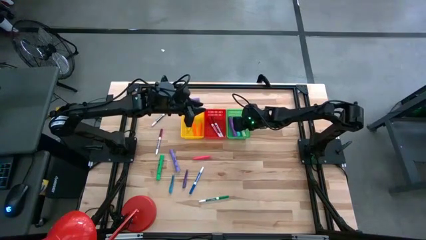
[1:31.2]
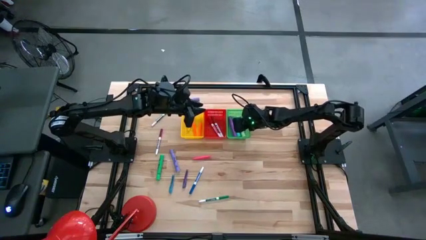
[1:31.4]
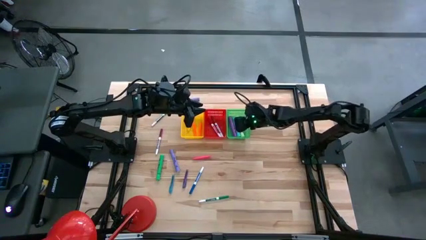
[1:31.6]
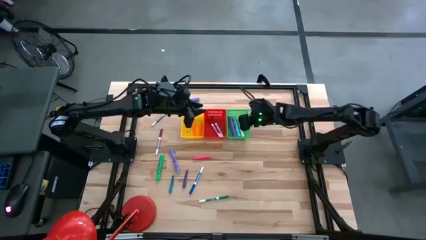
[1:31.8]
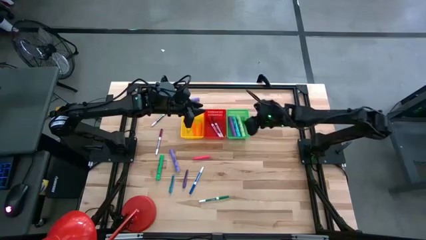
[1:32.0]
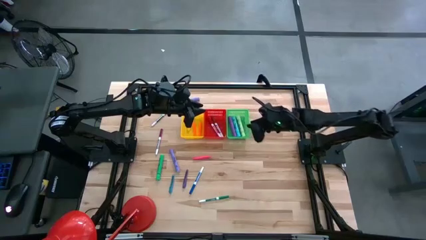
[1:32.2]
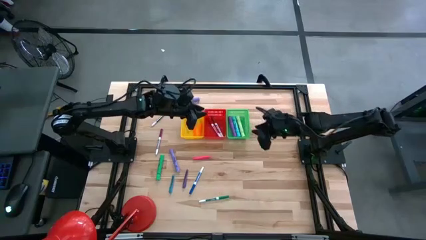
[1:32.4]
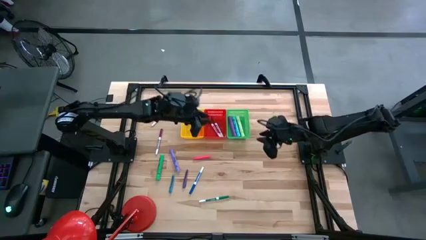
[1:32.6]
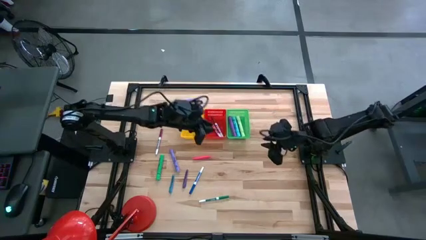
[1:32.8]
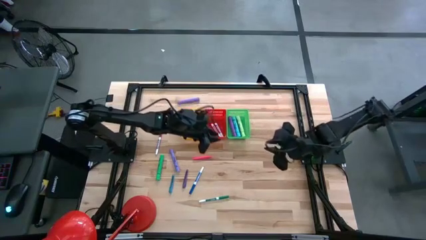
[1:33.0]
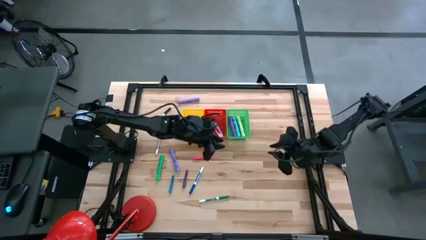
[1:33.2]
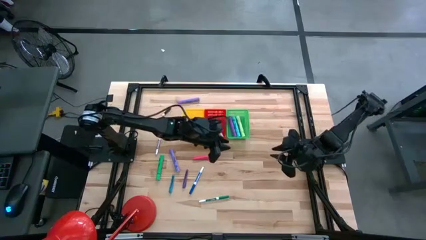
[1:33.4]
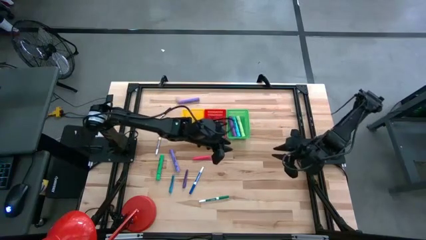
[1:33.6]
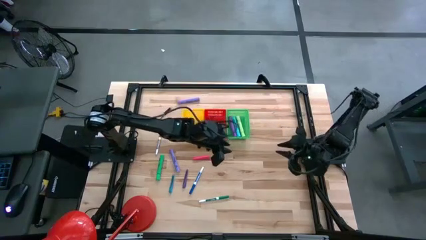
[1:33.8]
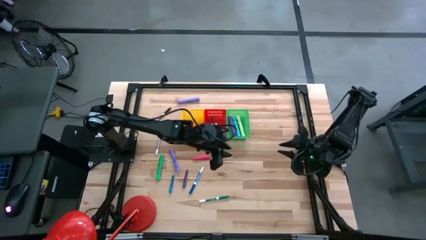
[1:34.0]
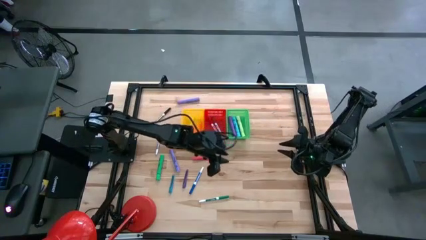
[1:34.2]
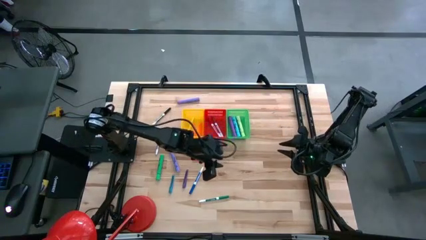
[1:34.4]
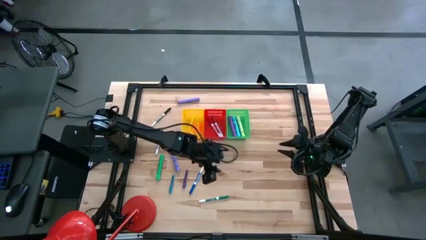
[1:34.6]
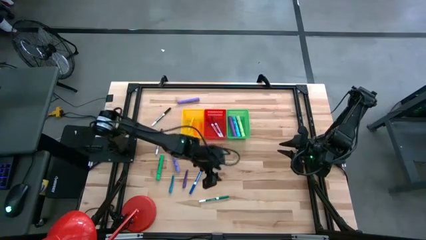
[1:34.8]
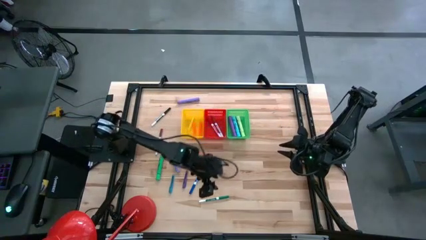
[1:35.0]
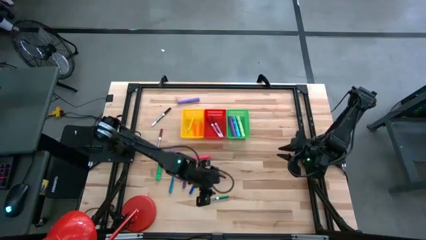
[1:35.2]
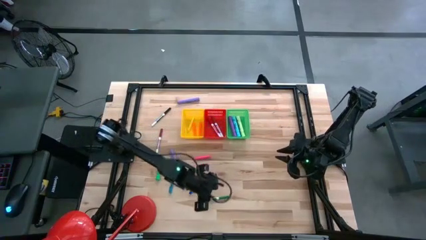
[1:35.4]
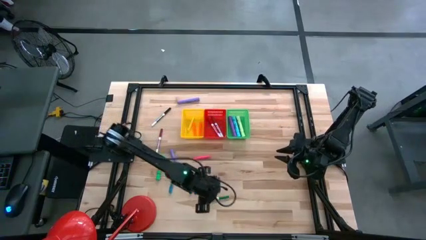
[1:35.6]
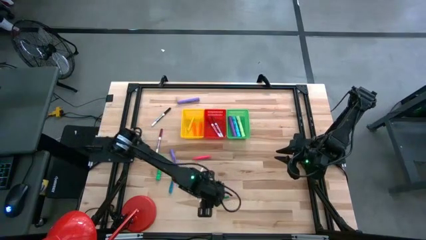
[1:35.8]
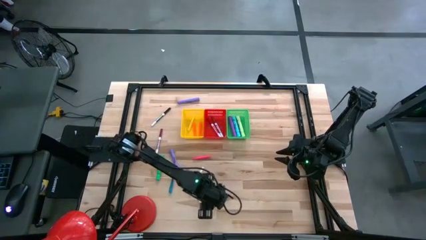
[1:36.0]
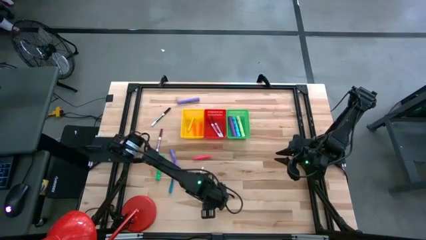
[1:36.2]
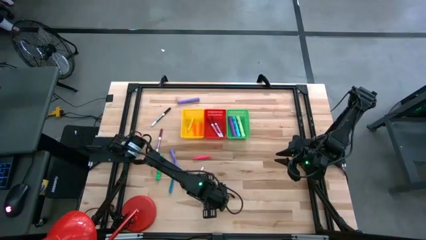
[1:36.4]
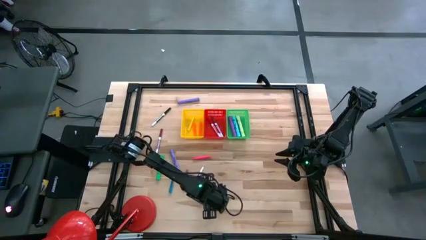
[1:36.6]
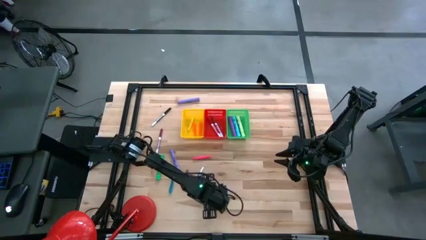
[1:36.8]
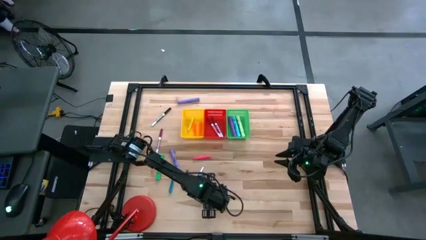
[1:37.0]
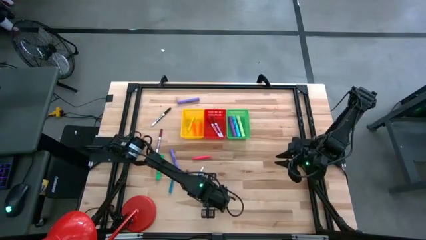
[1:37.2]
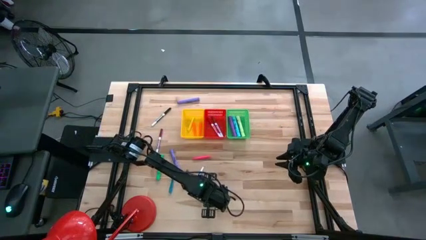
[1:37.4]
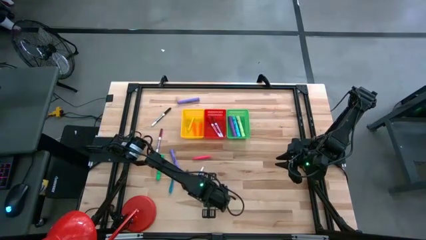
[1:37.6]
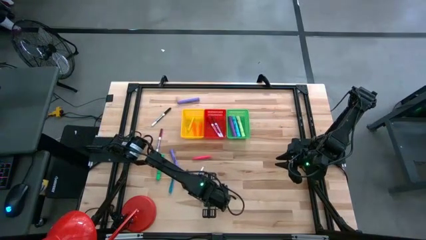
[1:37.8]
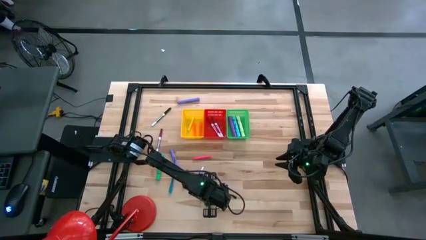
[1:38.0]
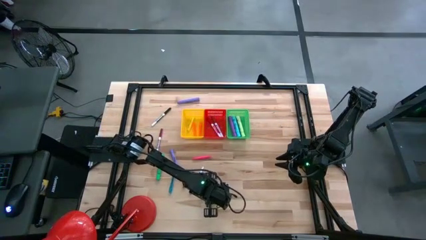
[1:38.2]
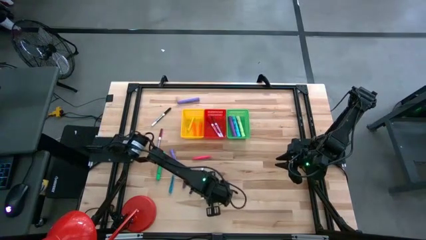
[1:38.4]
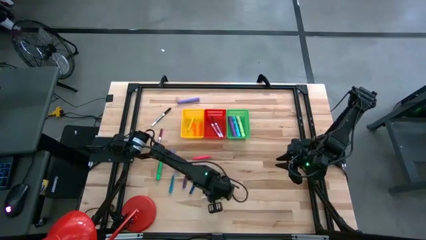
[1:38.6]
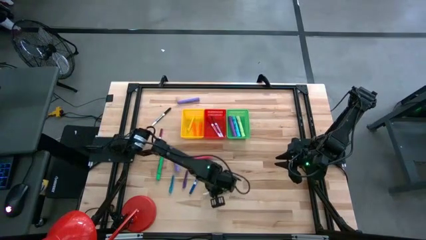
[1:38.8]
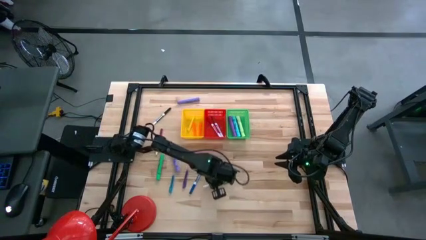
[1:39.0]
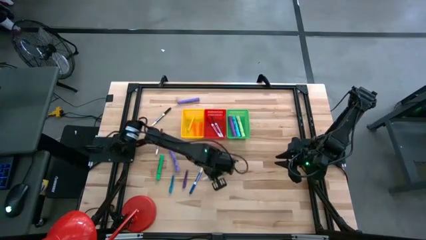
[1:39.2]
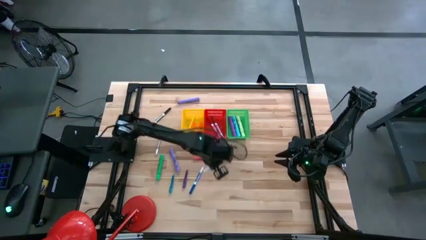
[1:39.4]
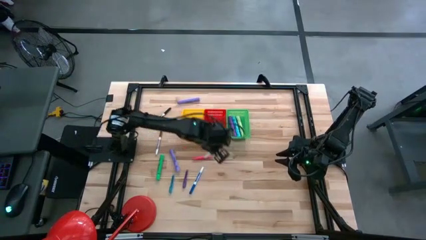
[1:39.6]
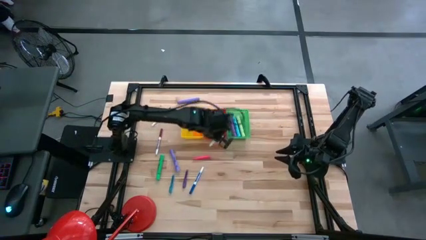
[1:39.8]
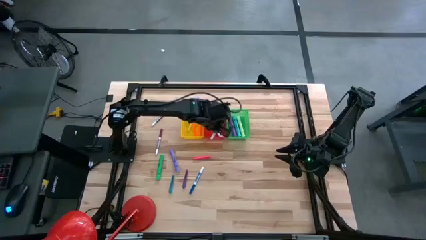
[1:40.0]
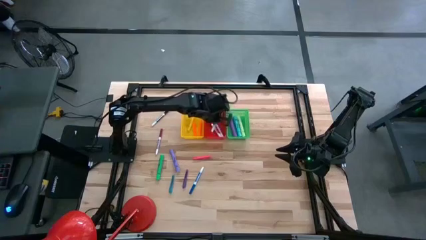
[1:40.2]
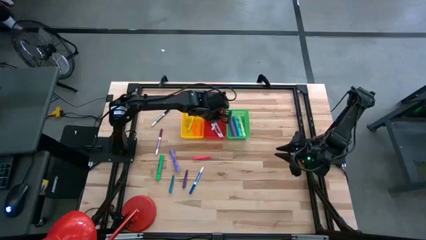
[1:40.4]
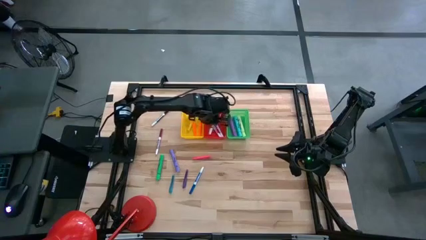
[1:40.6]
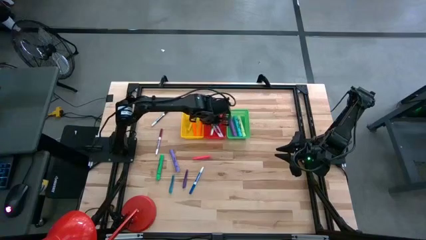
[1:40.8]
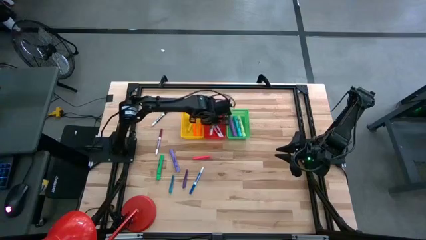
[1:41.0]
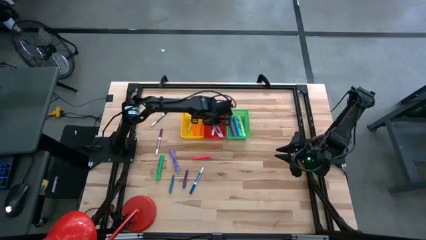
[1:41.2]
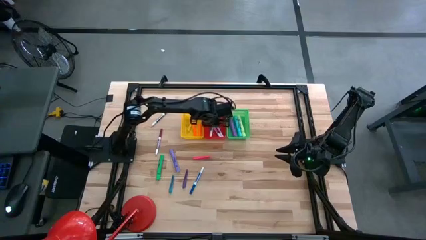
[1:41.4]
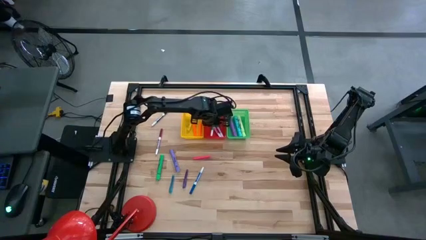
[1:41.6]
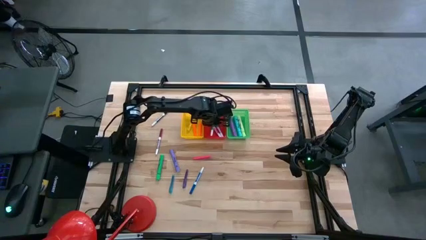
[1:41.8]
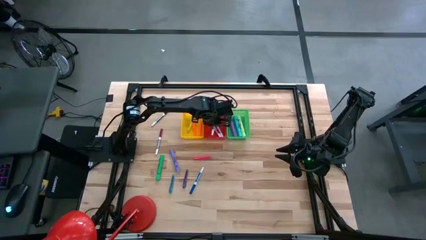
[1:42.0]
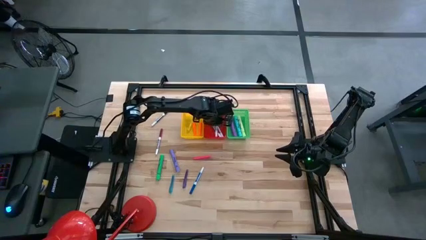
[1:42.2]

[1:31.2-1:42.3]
Task: Pick & Place Markers
Put the green marker into the red bin
